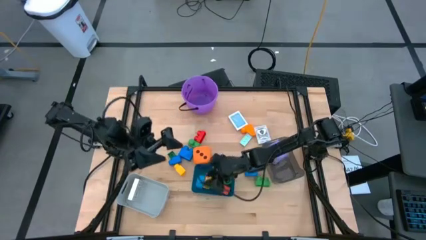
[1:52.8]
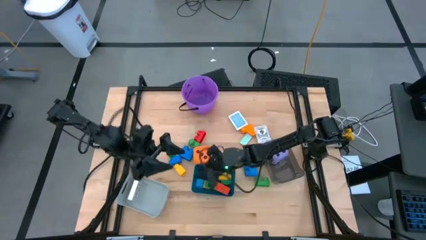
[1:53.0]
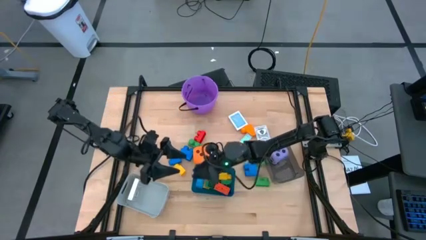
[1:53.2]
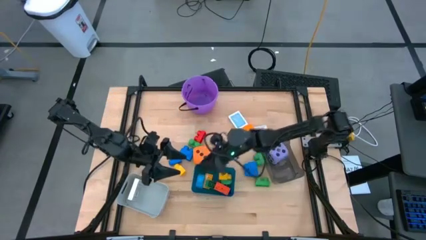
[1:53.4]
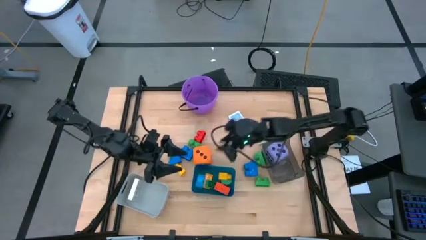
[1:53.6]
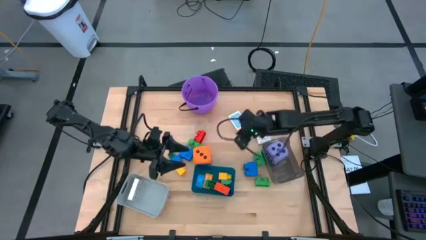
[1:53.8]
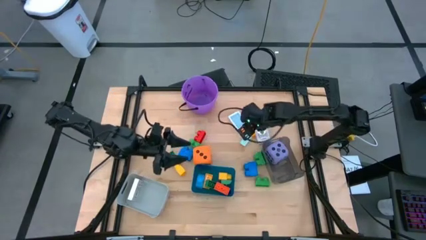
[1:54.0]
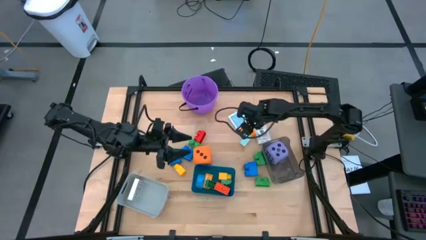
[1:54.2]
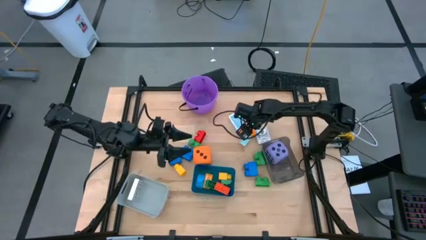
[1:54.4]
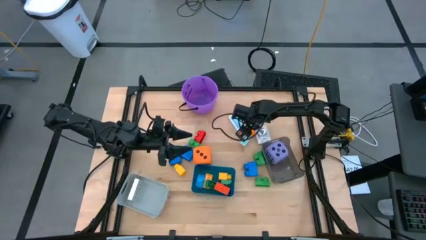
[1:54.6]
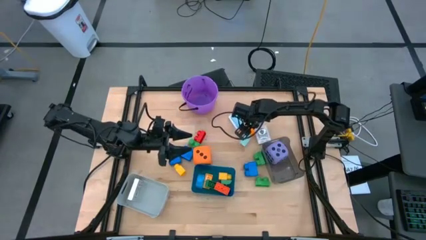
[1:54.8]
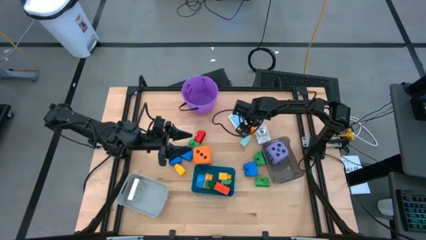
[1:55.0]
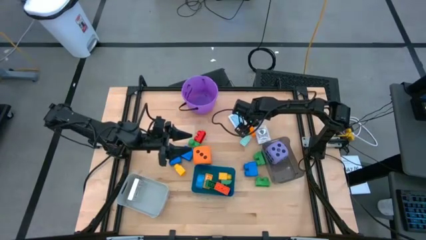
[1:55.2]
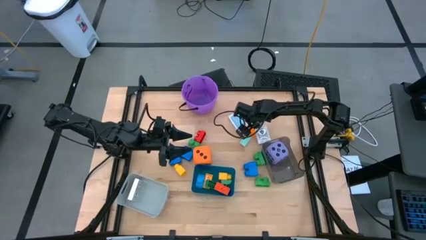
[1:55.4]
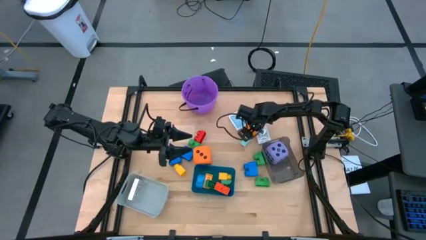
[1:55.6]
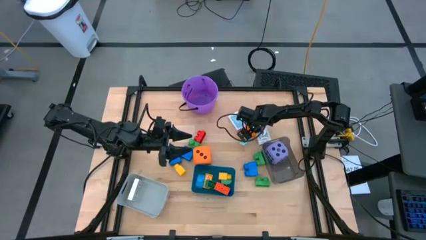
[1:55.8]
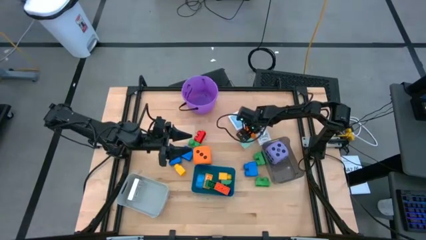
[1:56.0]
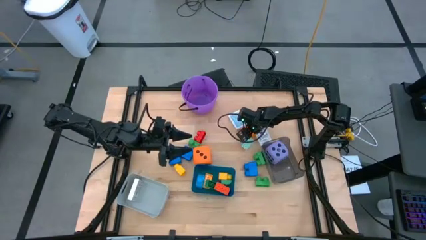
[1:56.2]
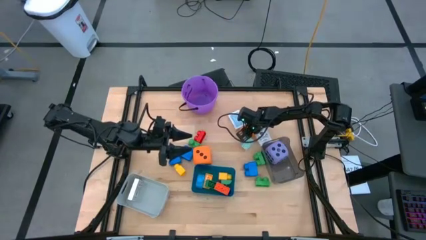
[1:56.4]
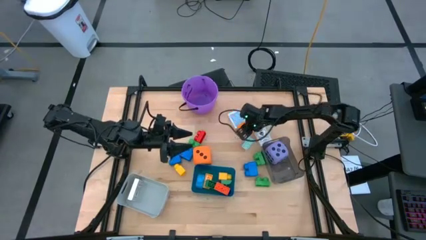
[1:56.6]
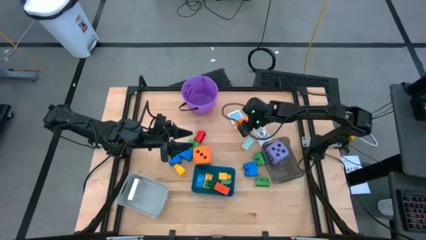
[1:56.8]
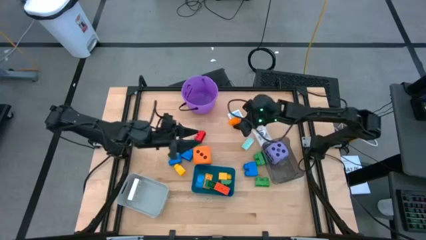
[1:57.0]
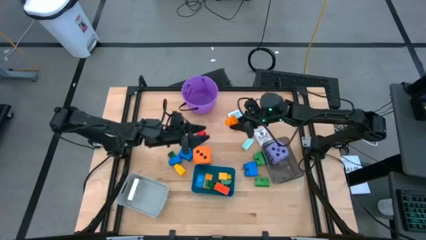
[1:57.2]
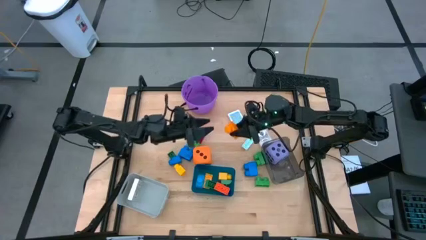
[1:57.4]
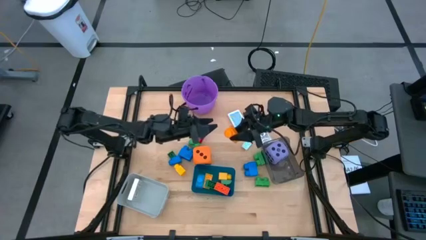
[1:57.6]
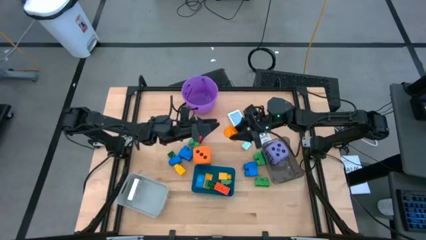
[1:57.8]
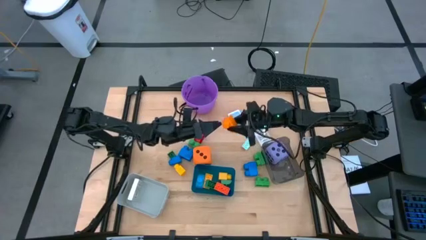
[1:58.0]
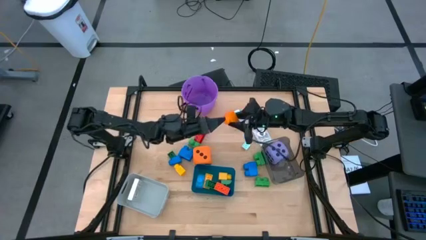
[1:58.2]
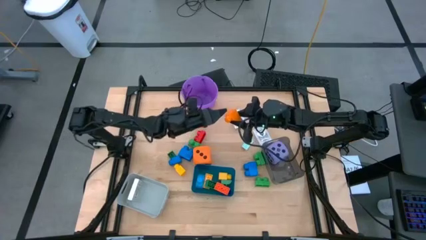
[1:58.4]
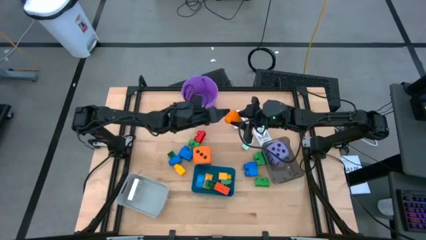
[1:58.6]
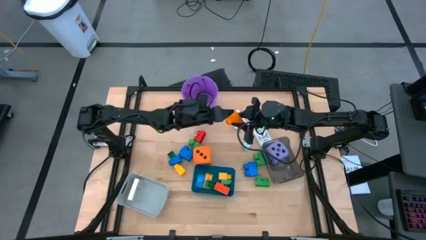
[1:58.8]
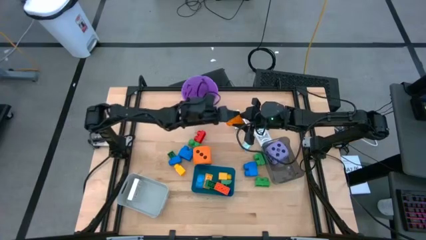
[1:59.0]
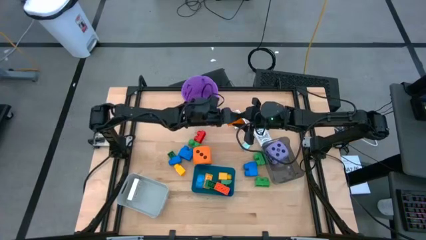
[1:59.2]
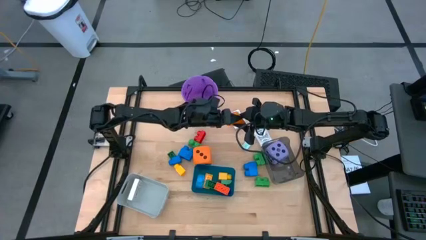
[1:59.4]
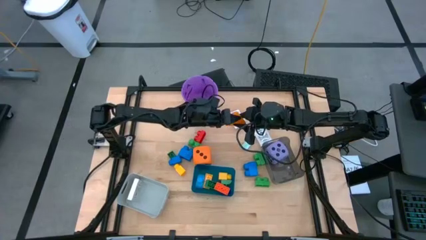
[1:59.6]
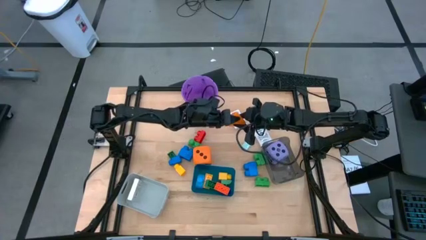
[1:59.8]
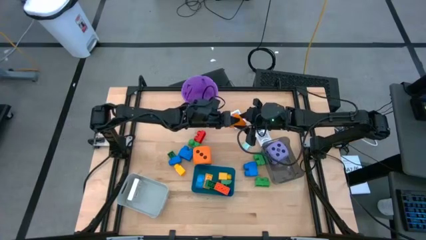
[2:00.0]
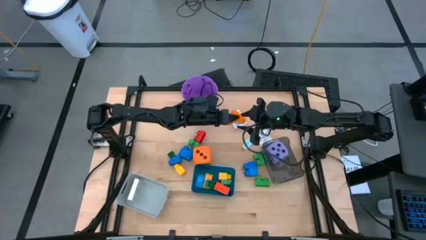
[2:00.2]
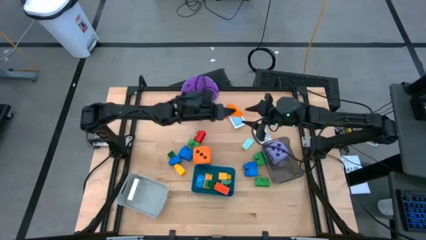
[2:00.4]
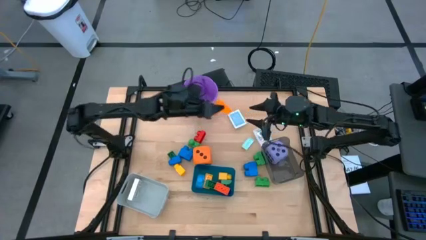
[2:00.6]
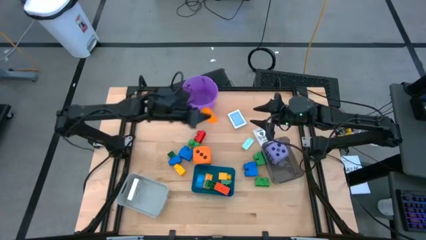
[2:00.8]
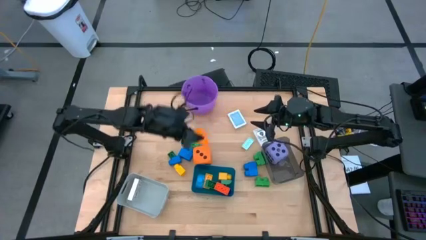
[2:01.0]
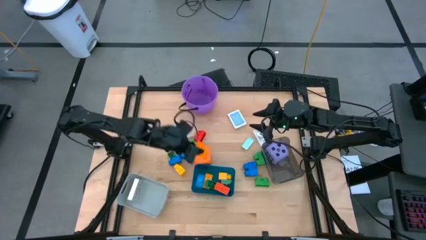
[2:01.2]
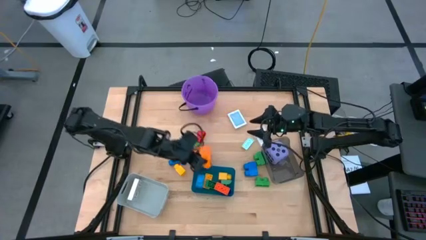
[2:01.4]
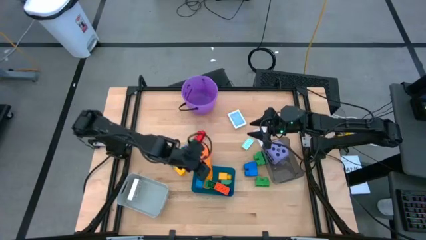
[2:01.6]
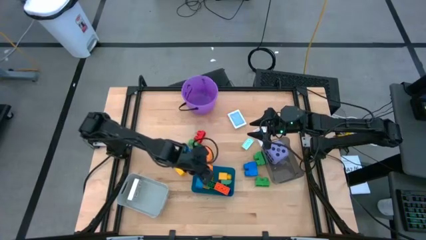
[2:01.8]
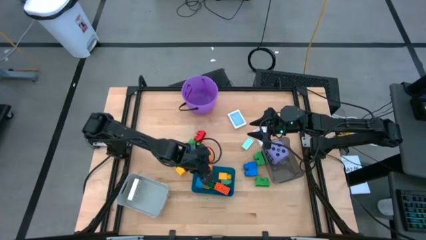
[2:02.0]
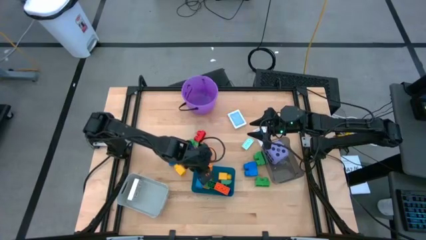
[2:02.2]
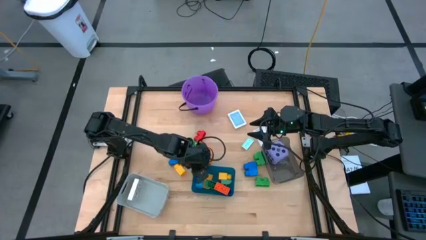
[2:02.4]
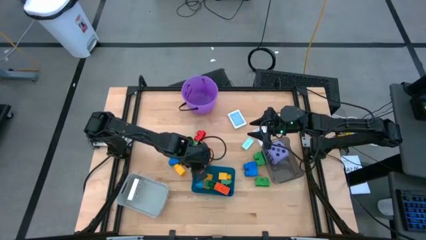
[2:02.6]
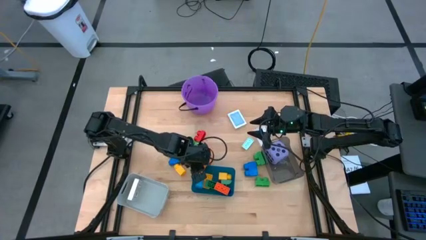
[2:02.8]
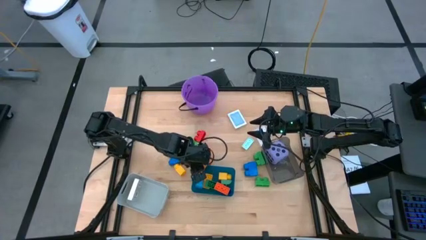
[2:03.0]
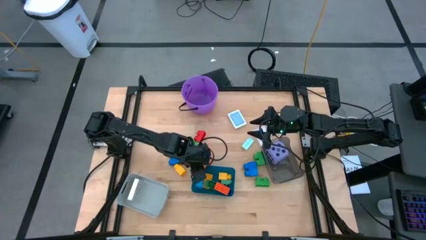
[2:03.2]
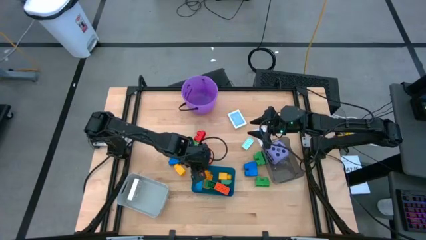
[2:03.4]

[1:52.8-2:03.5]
Task: Pick & Place Toys
Put the orange game piece into the blue bin

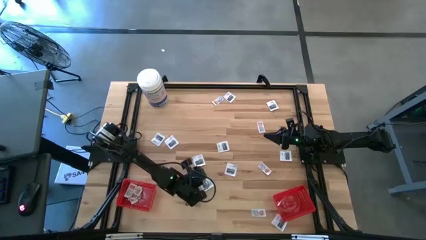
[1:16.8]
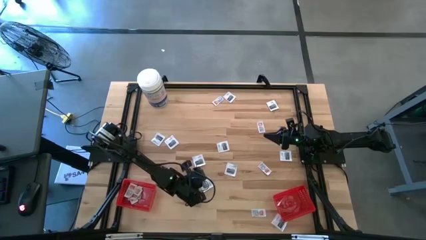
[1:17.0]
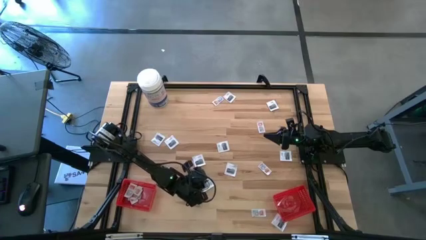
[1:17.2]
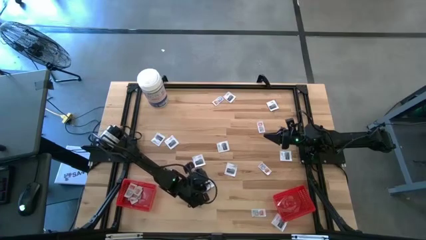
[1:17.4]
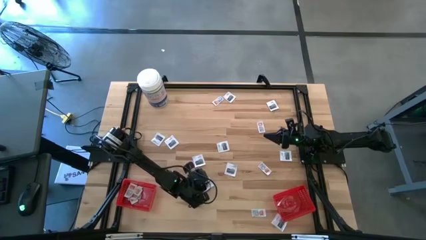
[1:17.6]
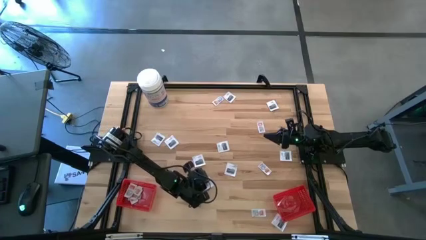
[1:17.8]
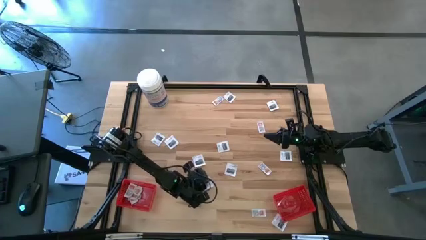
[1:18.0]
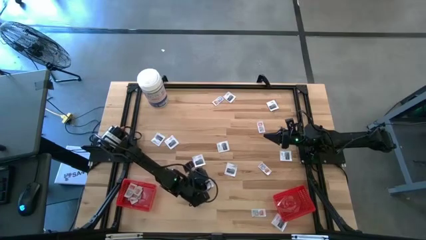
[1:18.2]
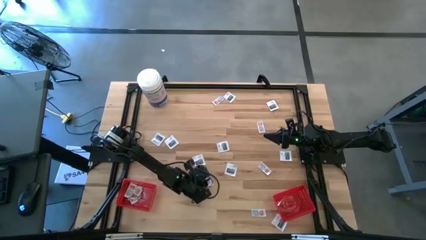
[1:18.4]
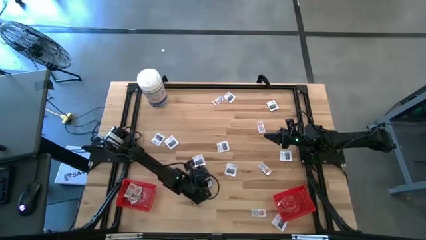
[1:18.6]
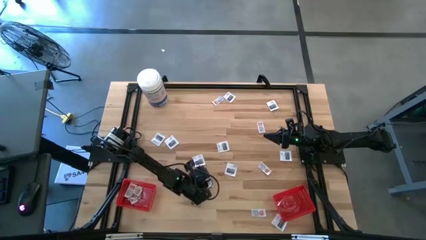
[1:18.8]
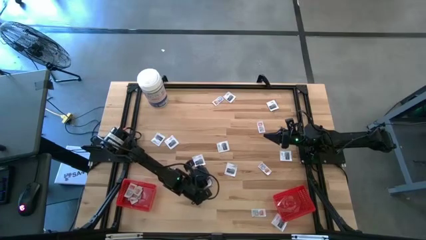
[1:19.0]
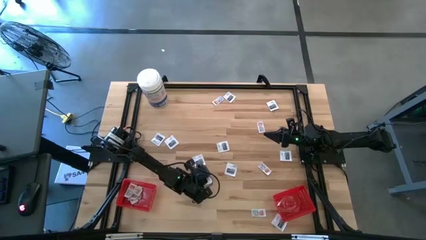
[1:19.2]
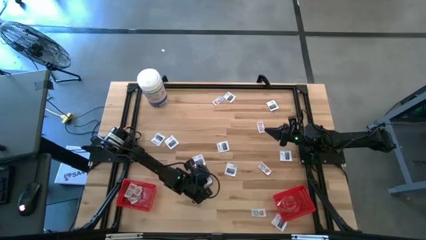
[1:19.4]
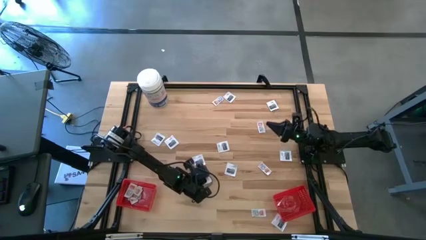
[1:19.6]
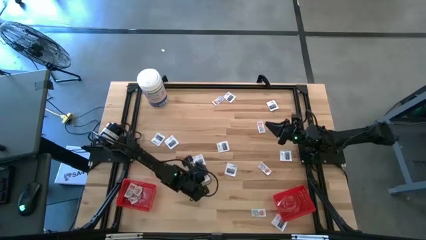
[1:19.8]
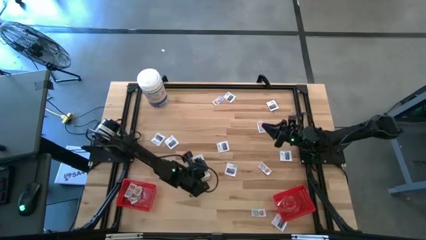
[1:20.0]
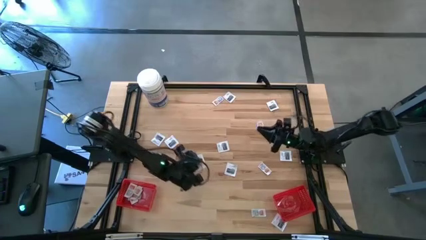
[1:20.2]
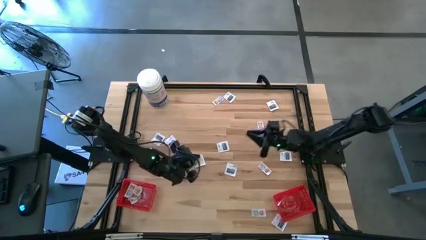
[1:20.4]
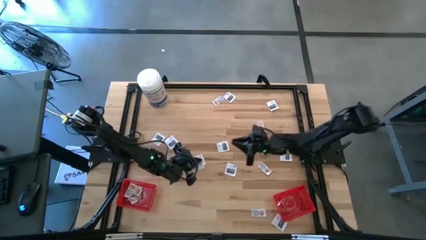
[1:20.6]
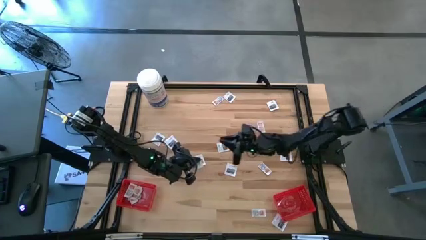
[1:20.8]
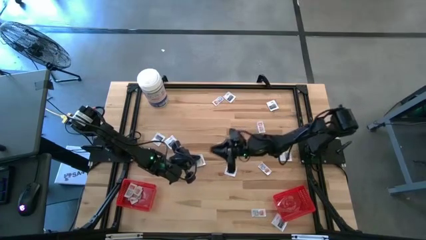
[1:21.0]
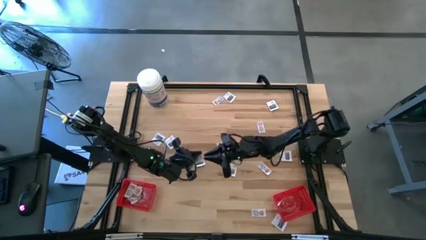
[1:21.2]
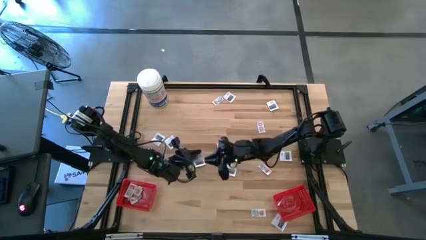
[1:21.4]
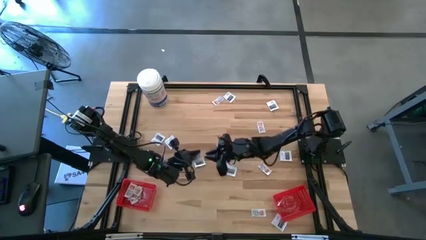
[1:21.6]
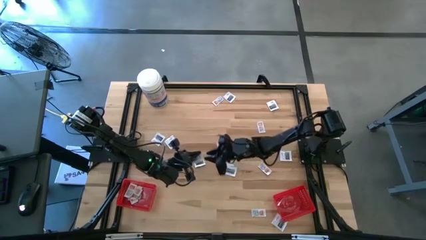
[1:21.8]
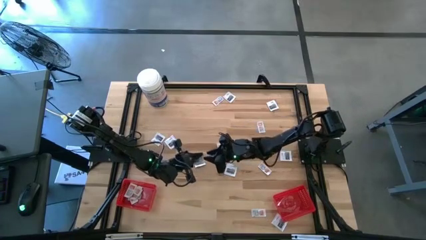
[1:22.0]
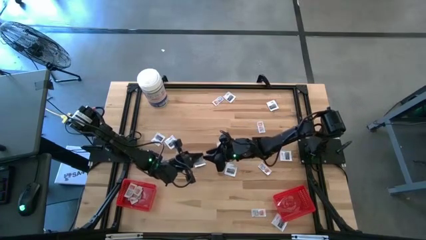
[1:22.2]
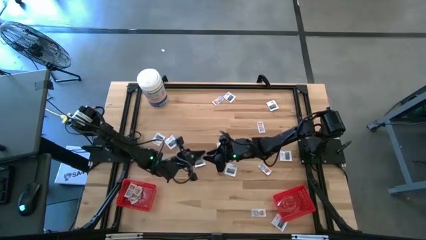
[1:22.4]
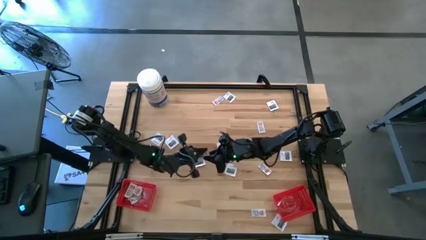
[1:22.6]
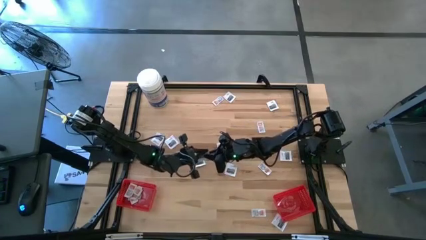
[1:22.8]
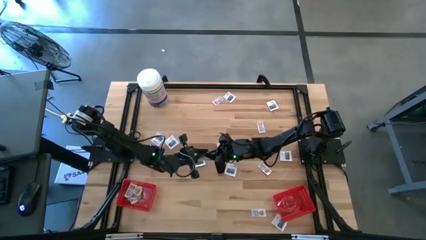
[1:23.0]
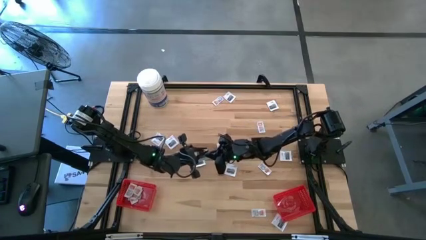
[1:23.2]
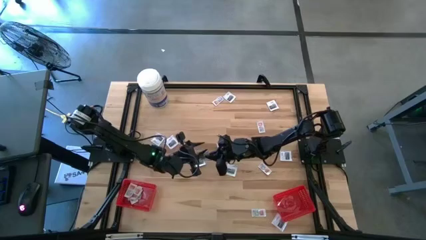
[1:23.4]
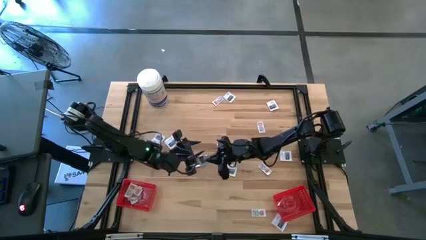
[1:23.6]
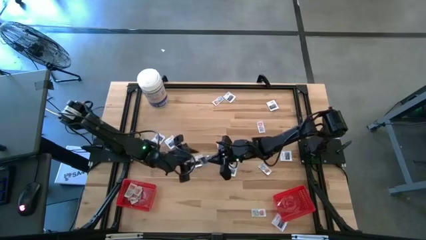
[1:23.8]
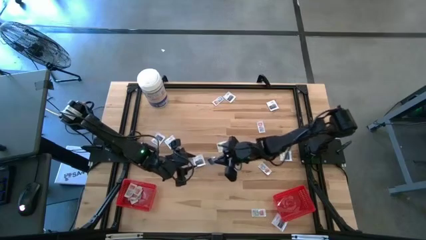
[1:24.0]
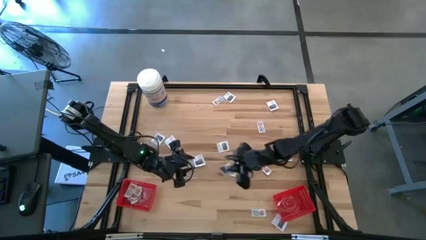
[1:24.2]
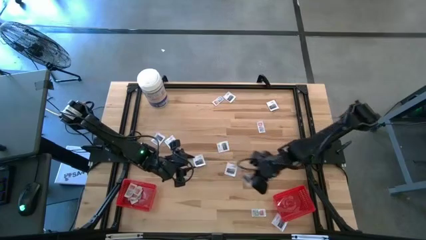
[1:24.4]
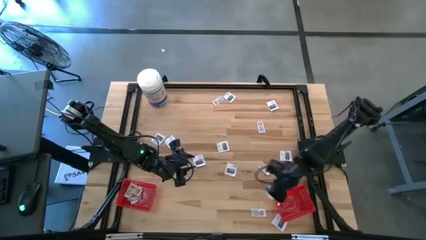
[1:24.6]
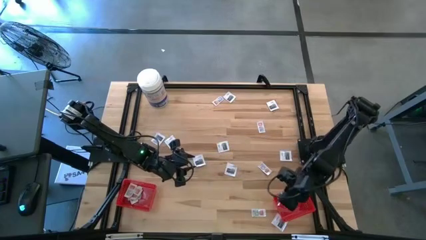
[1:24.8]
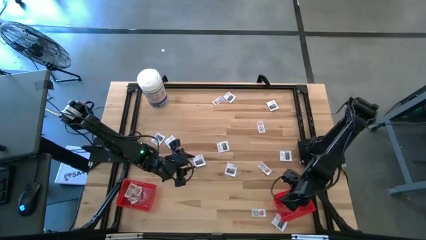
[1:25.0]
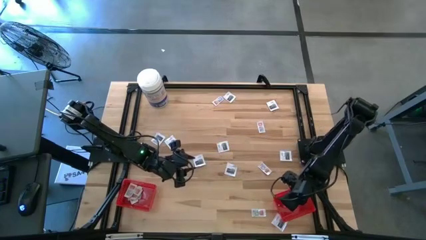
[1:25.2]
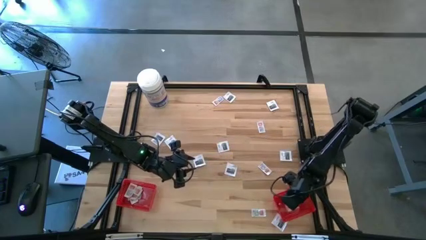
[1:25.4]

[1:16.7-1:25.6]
Task: Pick & Place First Aid Supplies
Put the towelette pack into the right red bin
